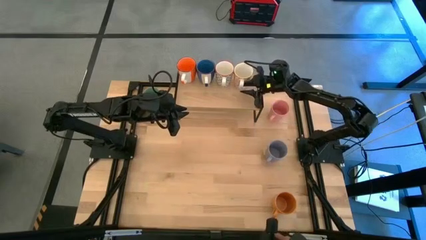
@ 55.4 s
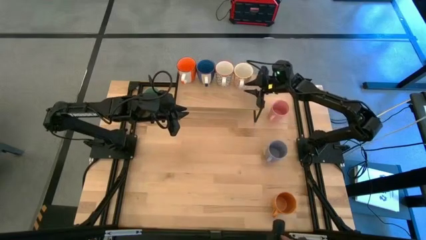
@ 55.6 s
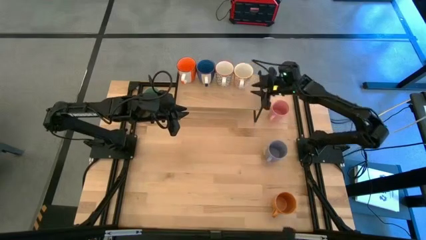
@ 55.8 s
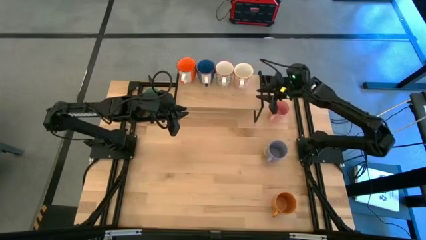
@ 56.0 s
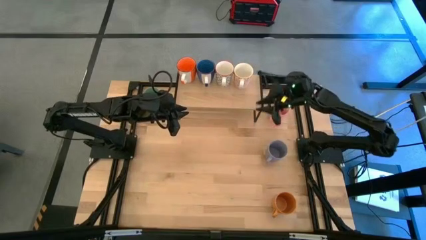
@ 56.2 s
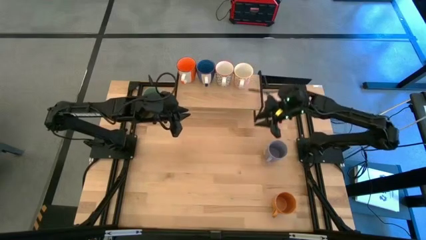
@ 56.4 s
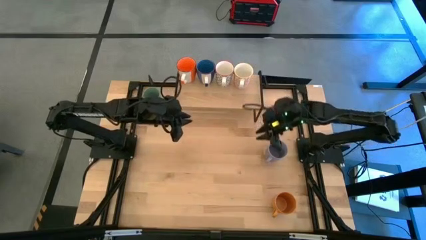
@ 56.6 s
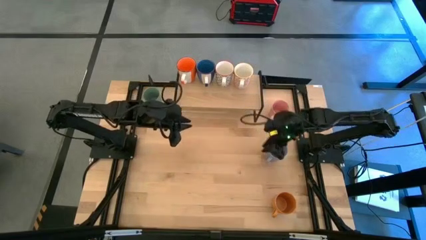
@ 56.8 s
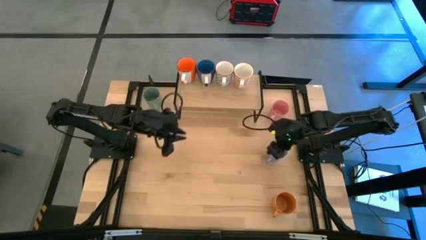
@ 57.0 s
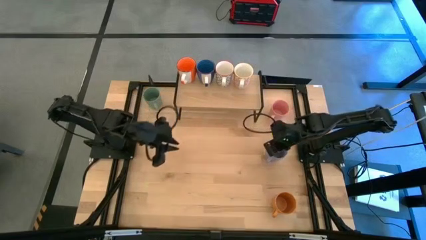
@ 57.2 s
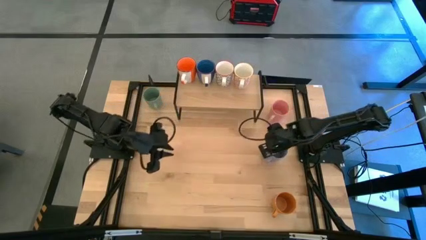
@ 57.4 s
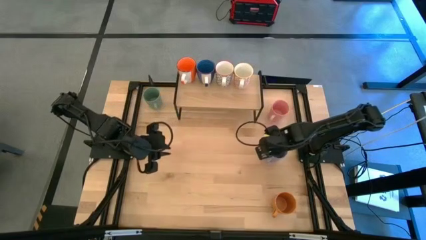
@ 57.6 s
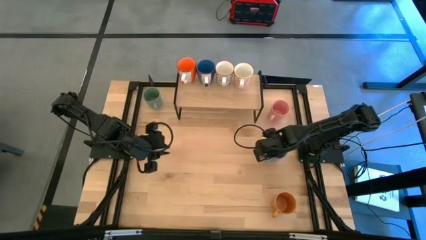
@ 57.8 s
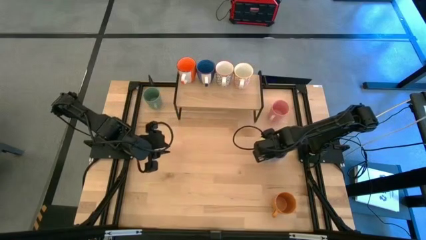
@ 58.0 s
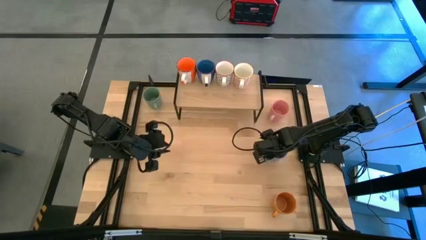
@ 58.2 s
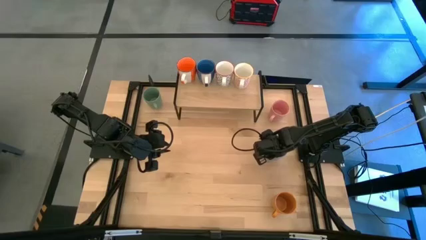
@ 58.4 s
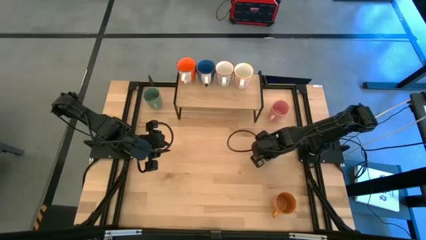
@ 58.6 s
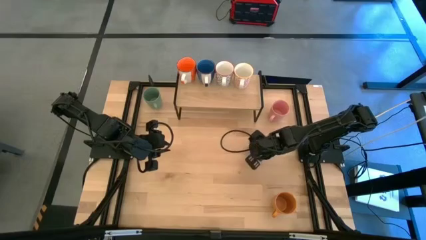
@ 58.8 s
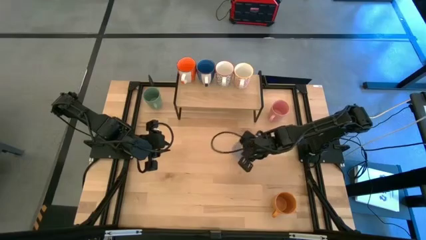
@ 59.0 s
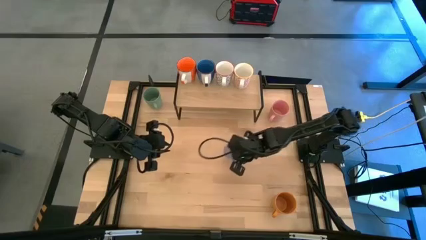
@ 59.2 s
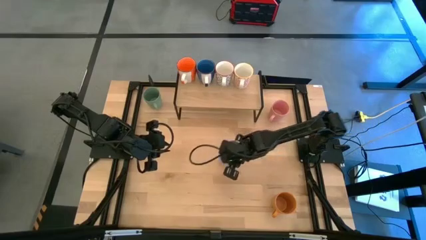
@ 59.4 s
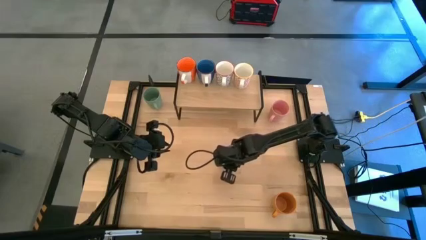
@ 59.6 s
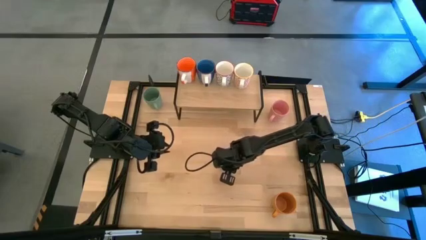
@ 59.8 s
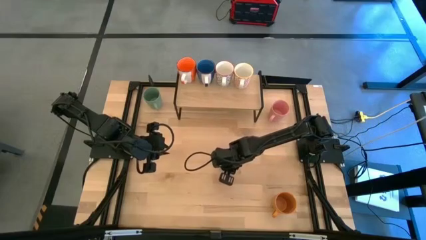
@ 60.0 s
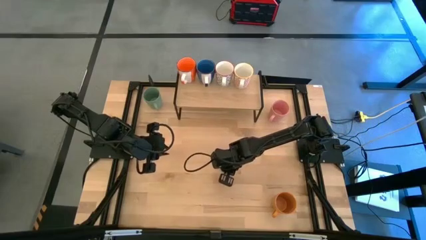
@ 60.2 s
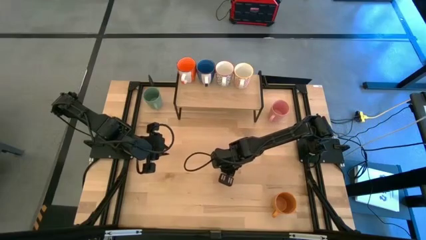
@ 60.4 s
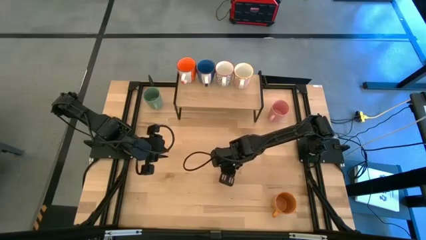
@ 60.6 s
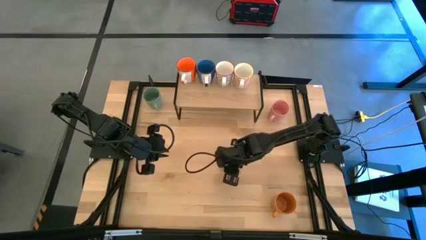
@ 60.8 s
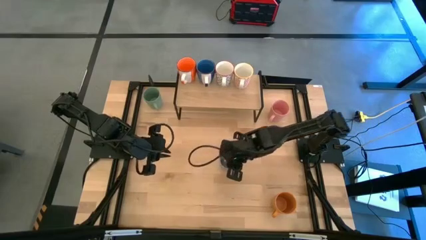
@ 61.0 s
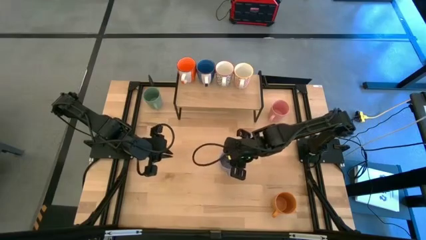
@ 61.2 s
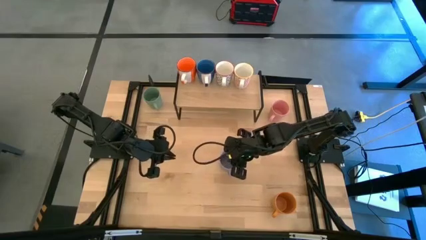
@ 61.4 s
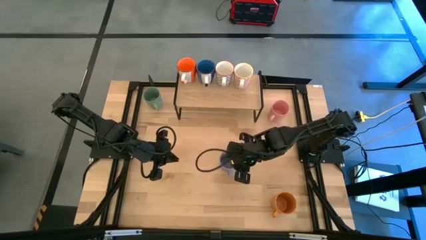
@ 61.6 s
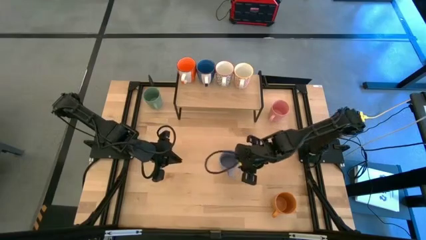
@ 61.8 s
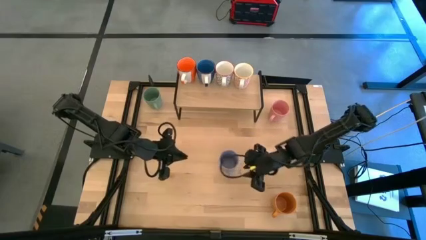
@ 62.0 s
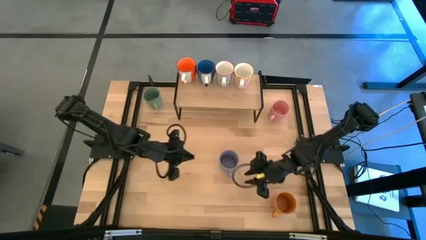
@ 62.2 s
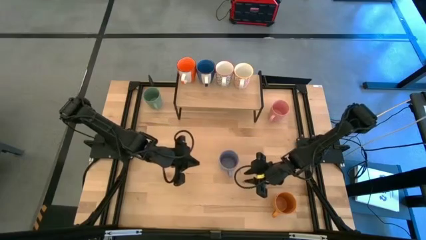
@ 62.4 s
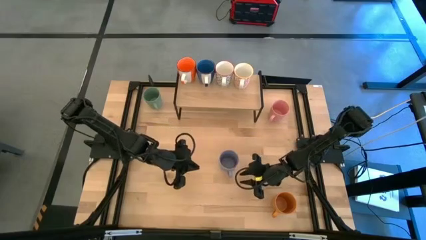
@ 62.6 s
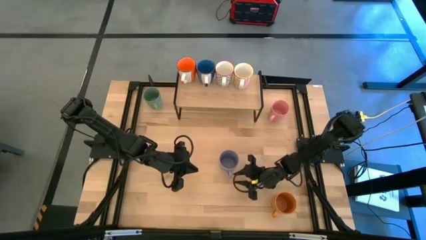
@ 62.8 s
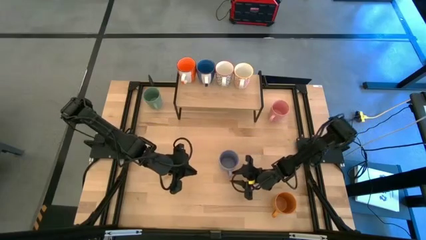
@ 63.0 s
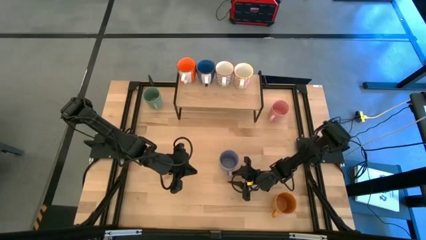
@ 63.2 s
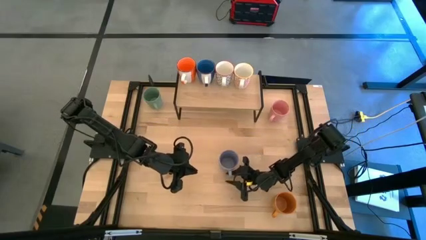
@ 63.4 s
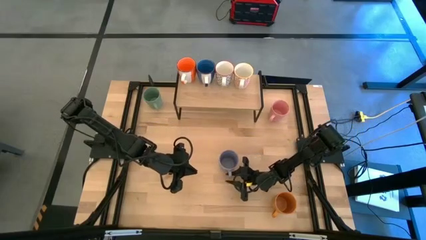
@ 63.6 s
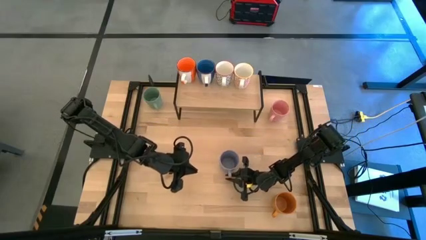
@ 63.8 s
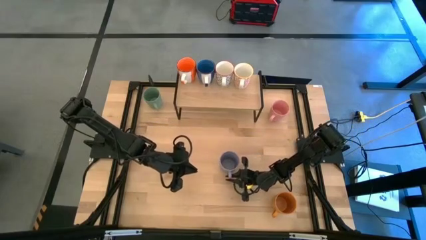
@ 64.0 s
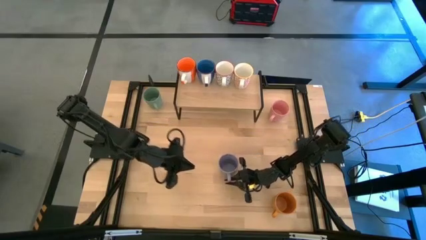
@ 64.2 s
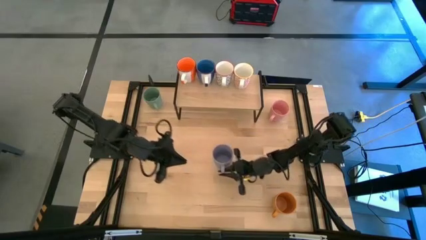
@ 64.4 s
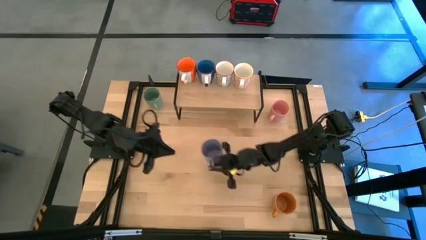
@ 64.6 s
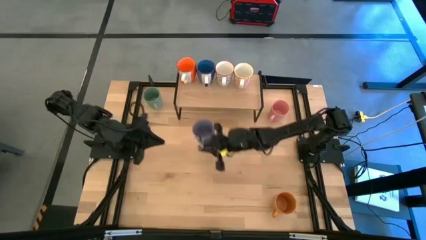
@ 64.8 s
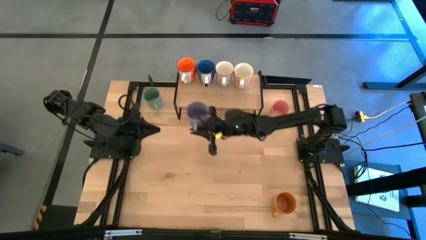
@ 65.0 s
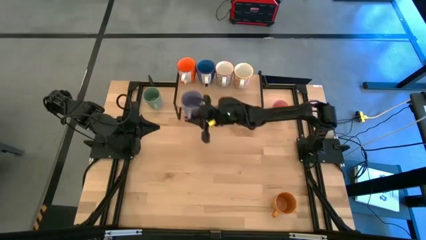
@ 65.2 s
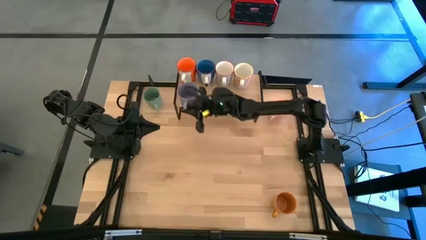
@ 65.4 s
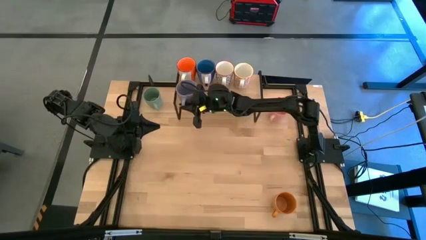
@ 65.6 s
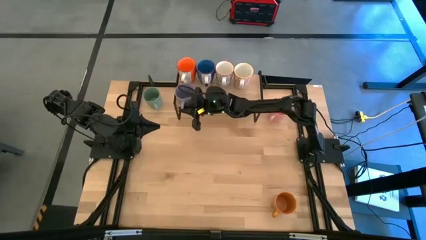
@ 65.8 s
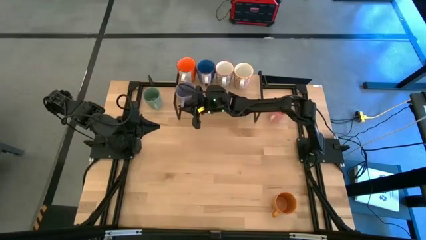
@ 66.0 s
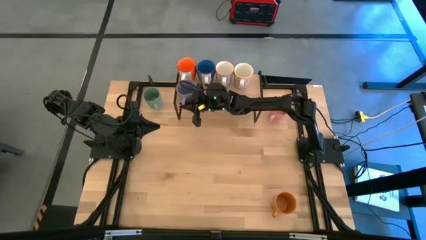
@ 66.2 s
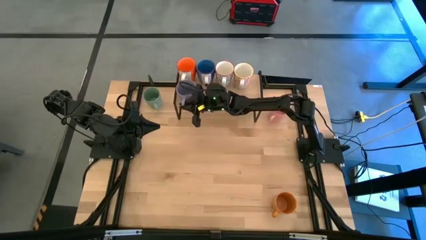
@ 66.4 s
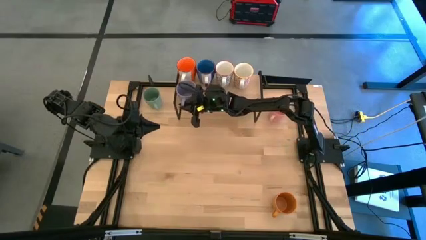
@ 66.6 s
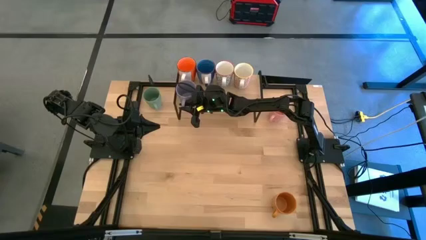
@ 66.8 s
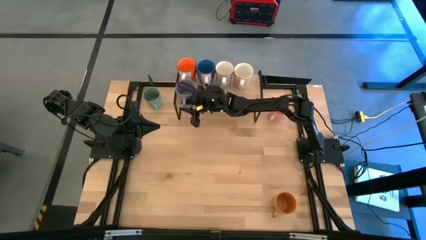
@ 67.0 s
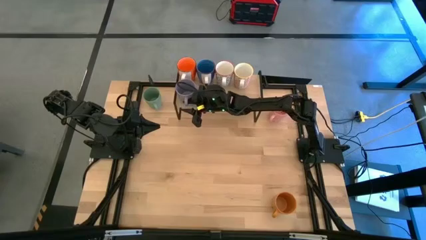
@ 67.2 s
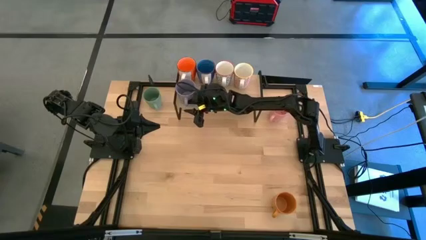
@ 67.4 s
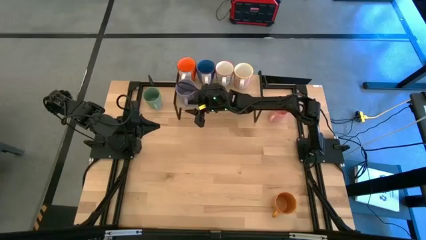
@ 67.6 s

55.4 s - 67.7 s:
Task: Place coffee mugs
Put the blue mug on the shelf

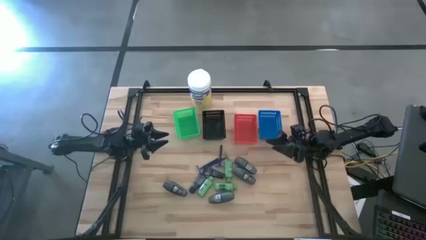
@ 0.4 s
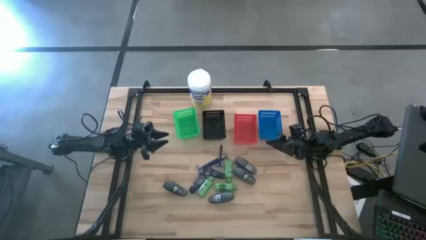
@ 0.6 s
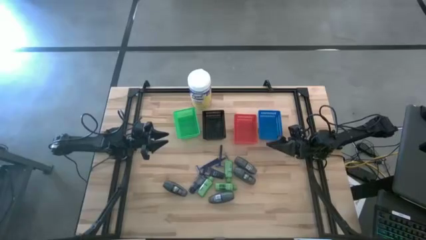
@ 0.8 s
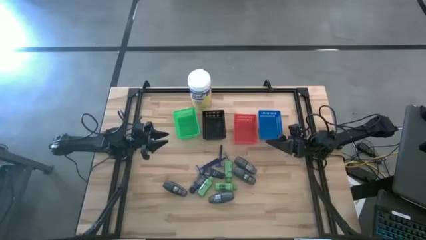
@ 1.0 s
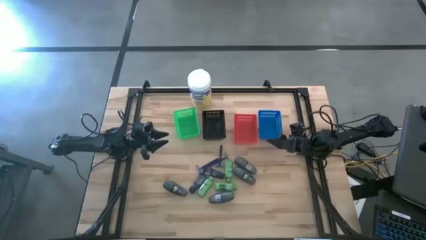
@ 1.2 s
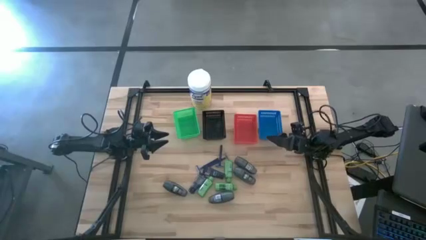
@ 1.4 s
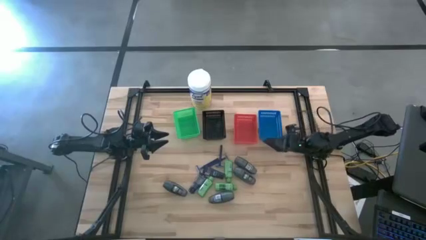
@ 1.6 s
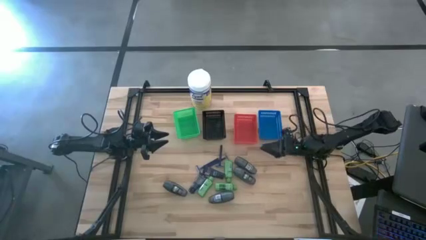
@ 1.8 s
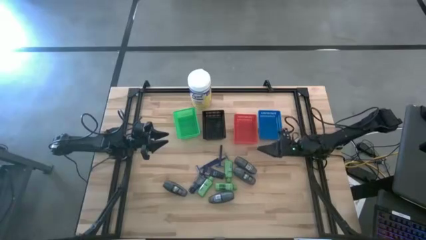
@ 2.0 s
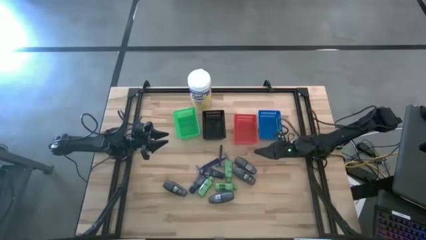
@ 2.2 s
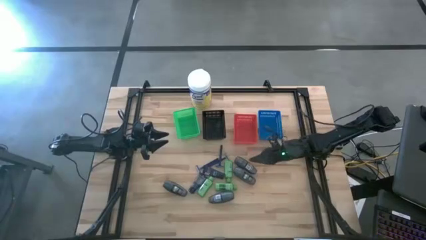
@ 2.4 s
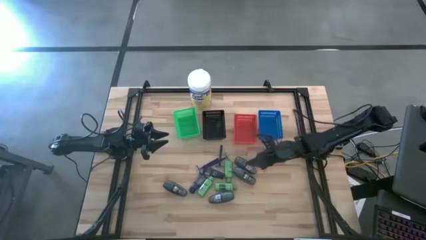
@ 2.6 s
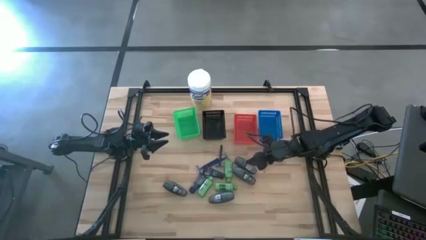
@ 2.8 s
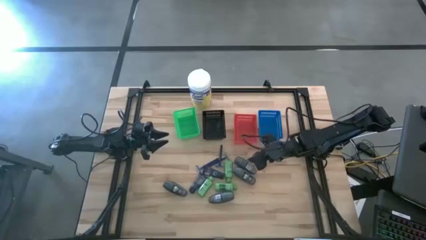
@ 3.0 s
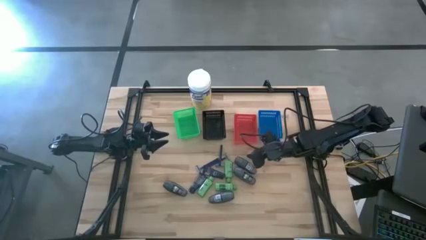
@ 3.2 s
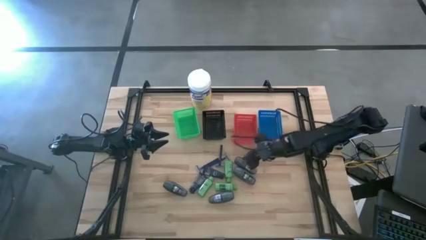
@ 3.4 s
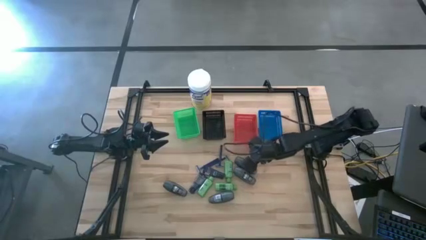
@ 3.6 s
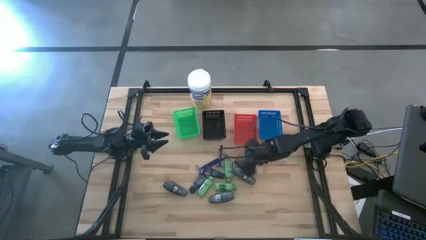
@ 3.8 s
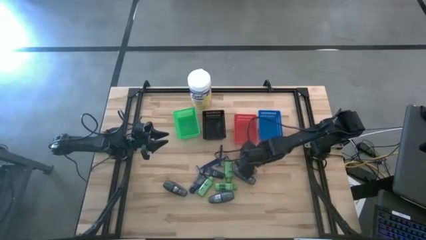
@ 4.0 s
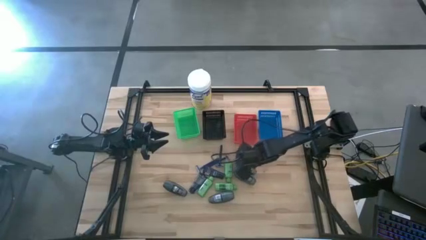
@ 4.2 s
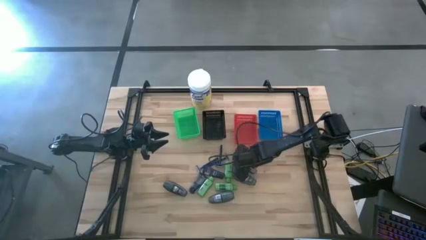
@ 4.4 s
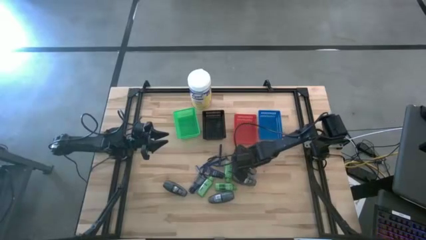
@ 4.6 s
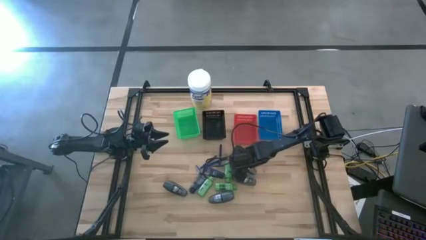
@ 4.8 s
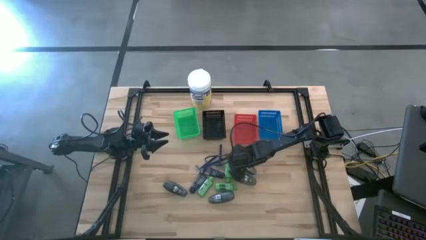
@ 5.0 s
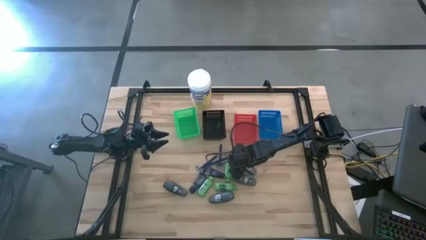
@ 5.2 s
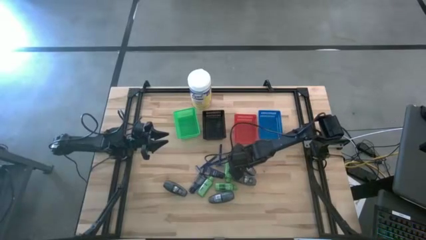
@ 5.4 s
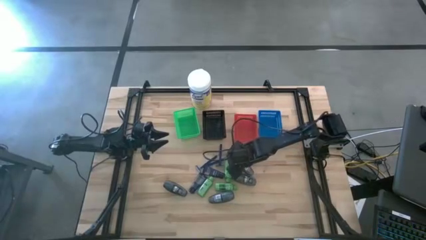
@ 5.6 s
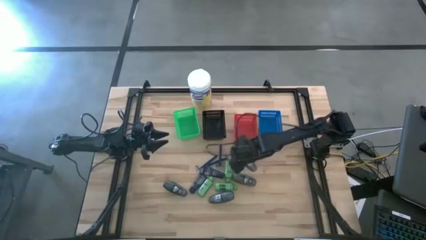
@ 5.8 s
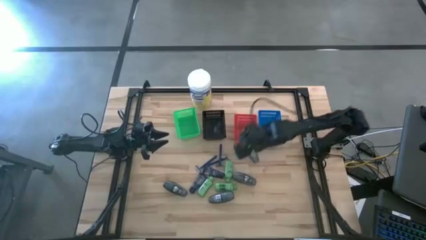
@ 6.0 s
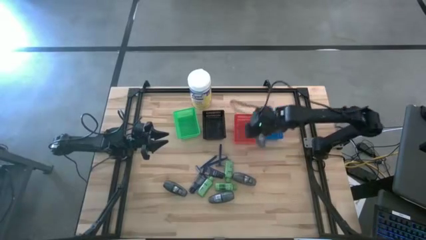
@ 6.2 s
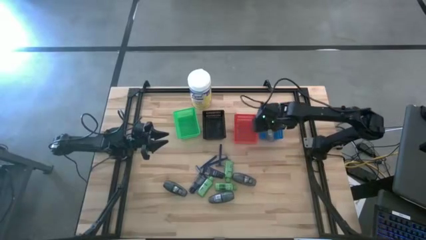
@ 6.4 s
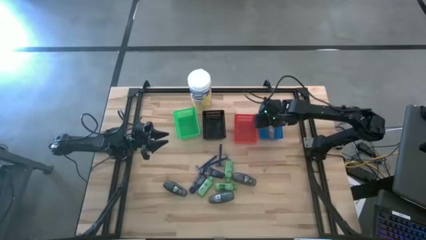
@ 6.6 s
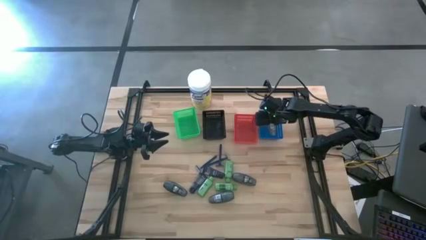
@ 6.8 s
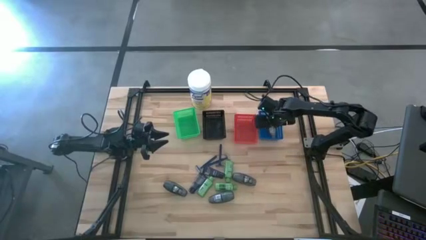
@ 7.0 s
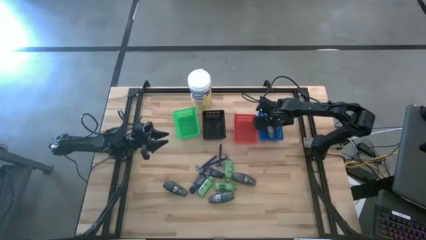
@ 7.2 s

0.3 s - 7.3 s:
Task: Pick & Place Travel size toiletries
Put the black deodorant into the blue bin
